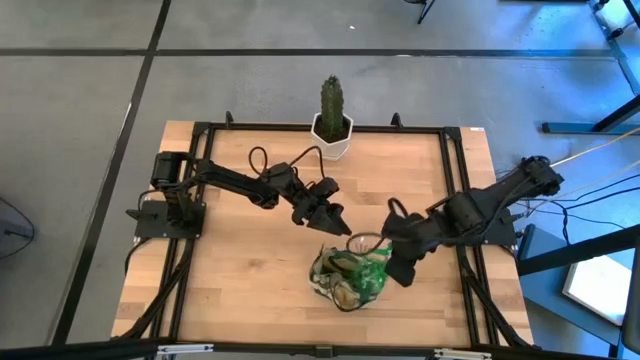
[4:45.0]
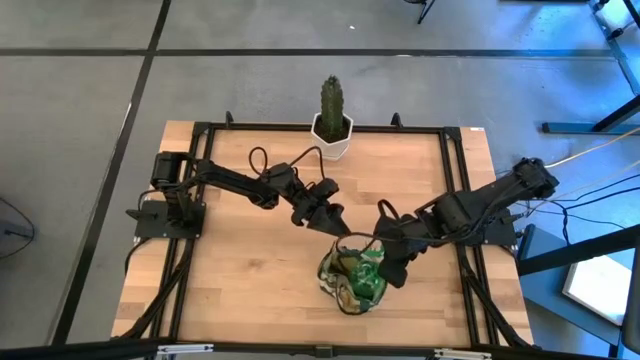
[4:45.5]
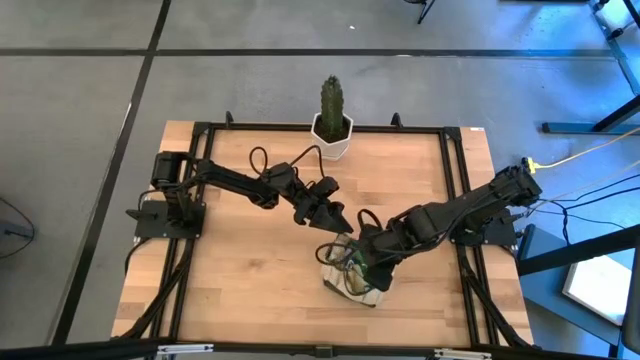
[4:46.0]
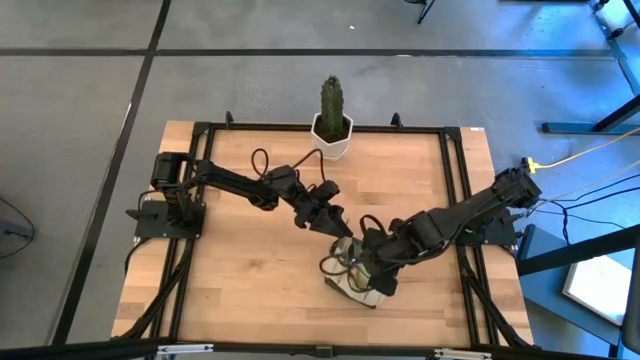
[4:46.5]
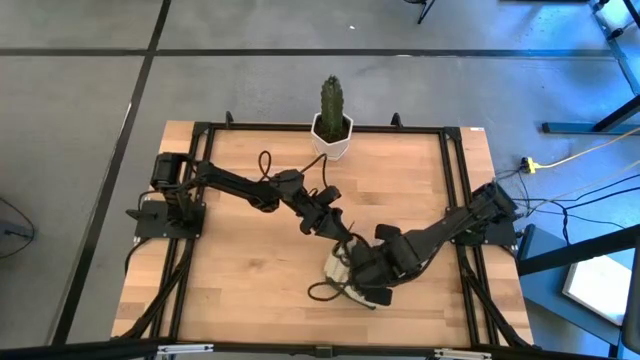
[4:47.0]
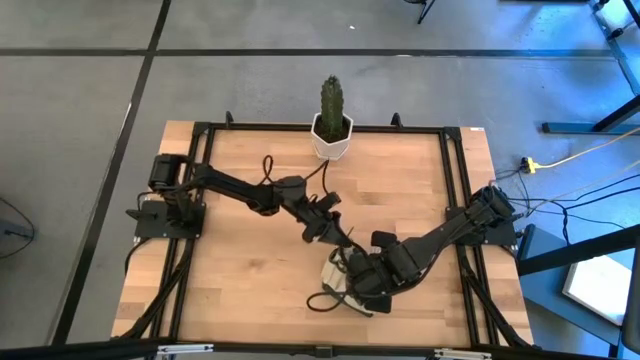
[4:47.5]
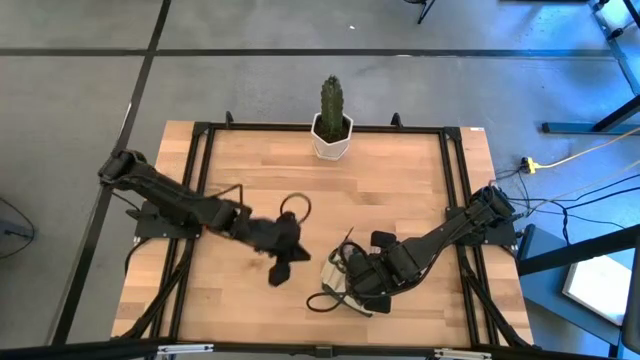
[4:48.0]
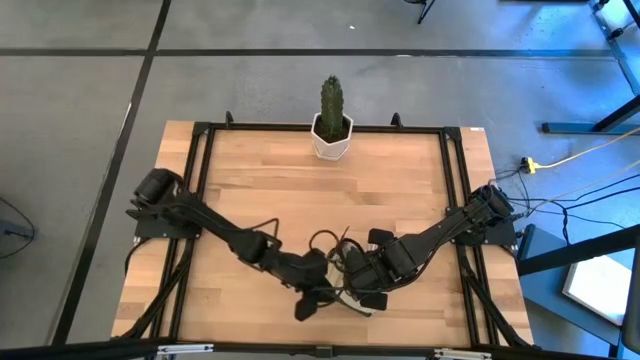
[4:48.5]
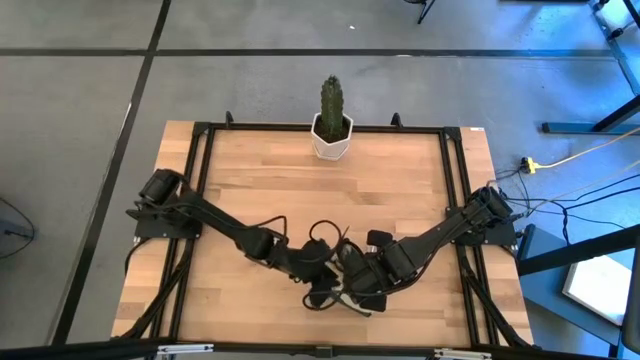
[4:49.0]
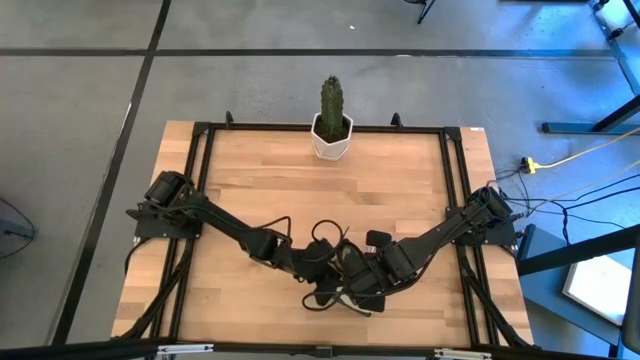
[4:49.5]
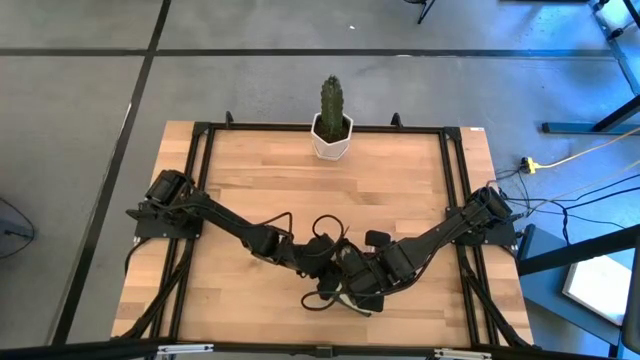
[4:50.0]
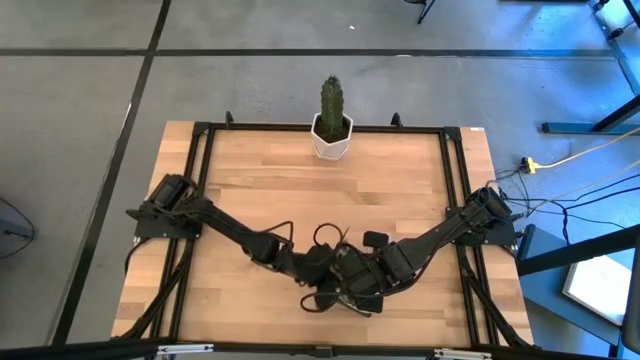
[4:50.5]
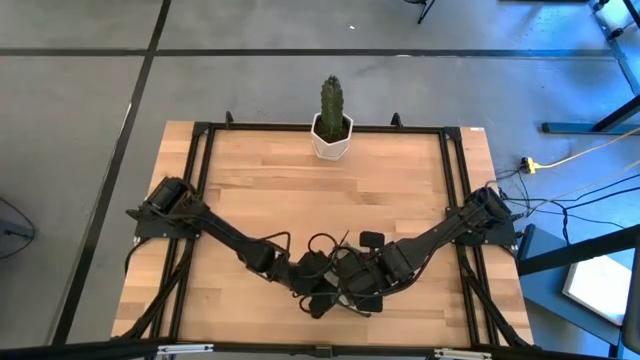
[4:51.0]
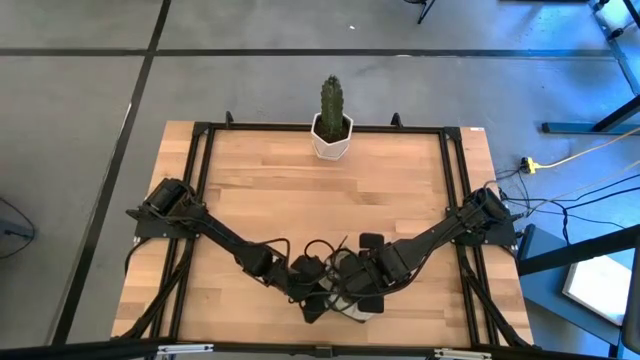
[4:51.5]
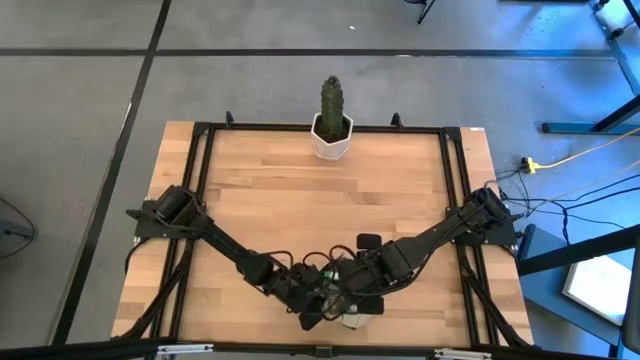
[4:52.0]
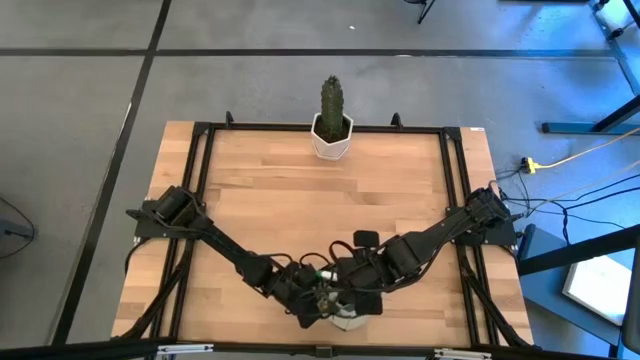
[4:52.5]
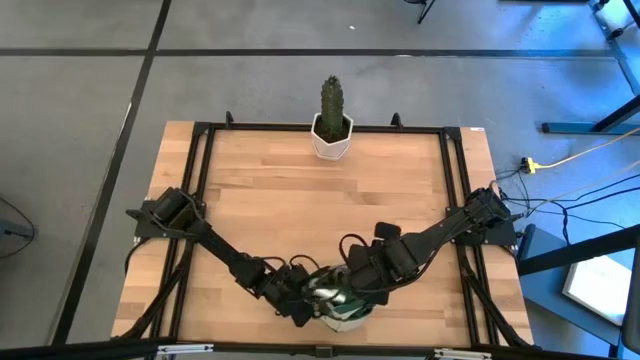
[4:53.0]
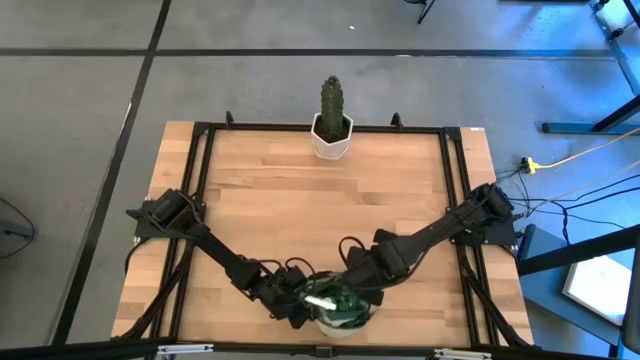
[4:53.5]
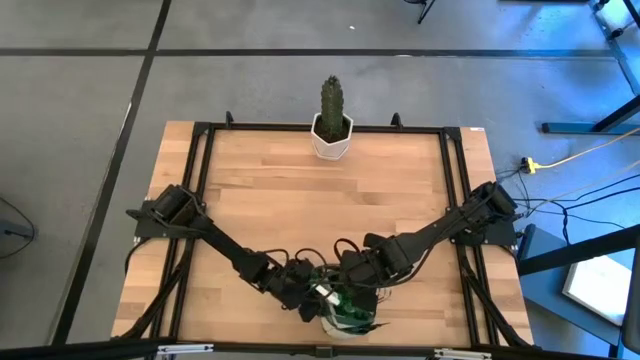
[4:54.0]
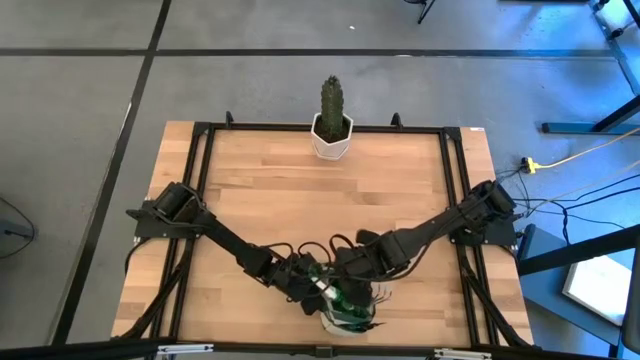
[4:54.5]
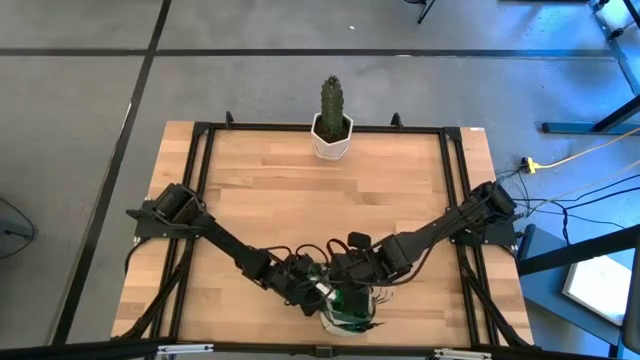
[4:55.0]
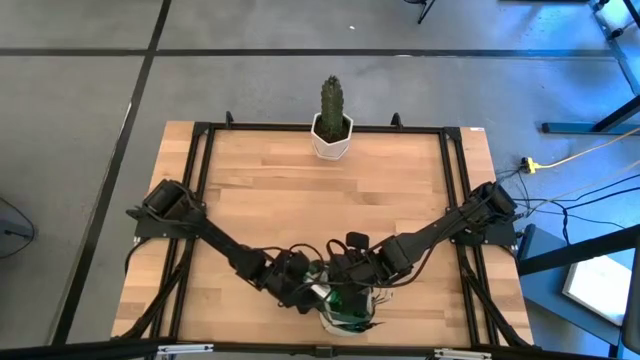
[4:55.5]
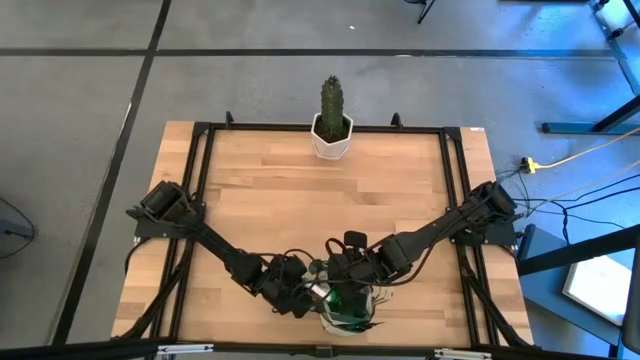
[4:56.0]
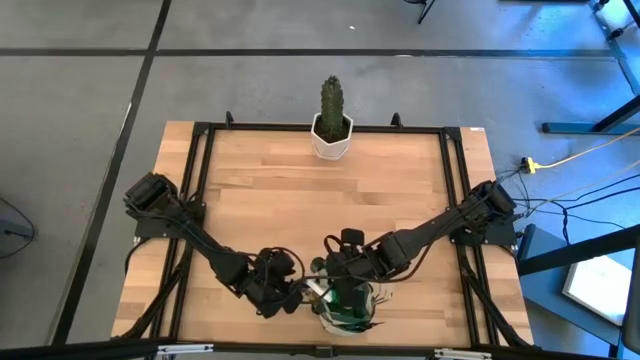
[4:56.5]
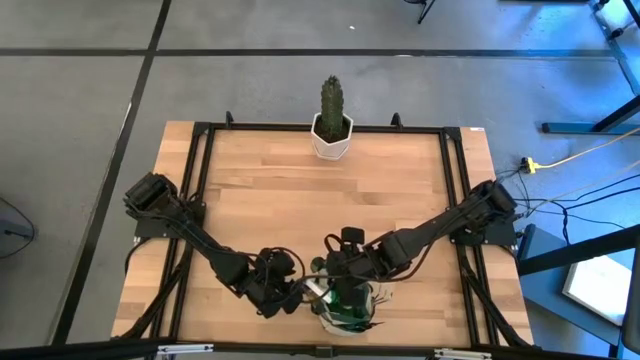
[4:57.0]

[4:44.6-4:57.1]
Task: Pick & Place Garden tools in Gardening bag
Put the green spray bottle into the green gardening bag

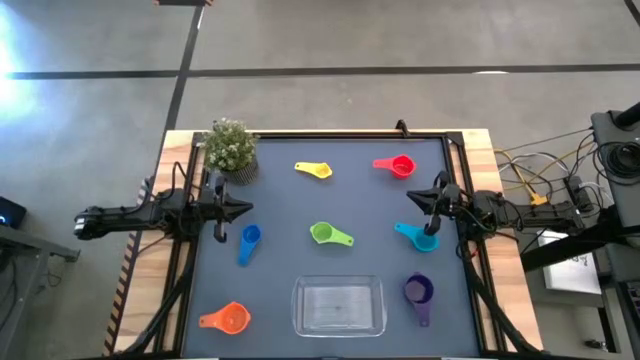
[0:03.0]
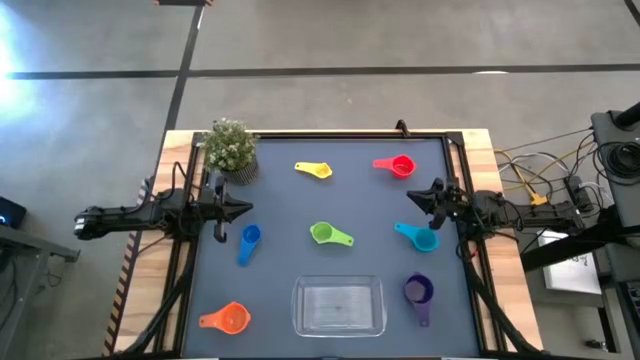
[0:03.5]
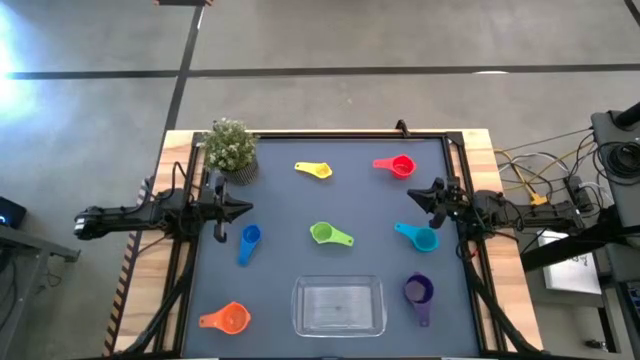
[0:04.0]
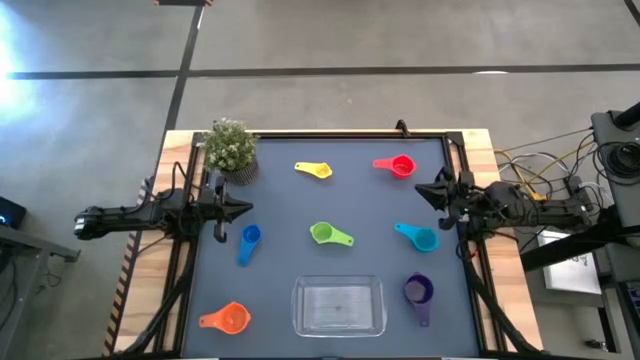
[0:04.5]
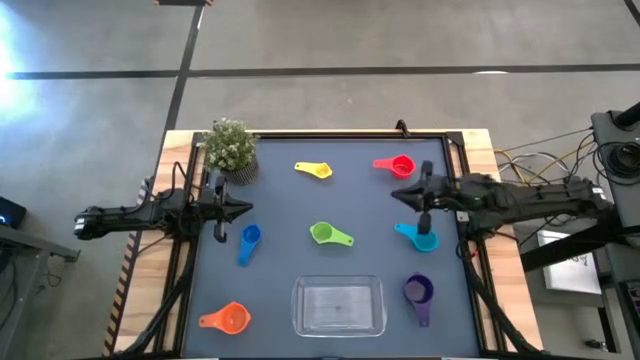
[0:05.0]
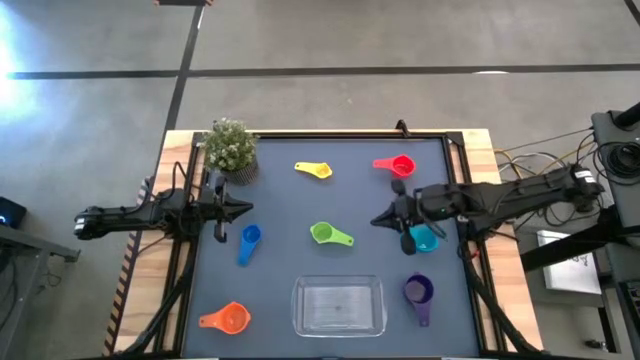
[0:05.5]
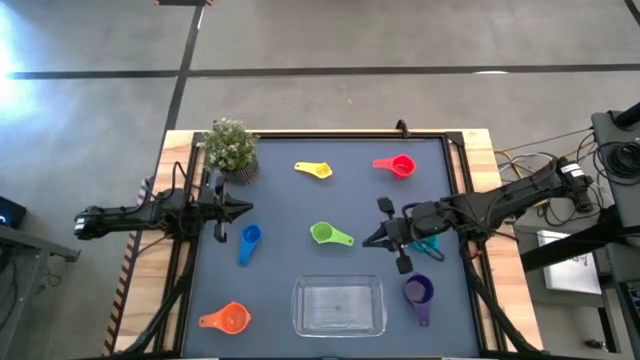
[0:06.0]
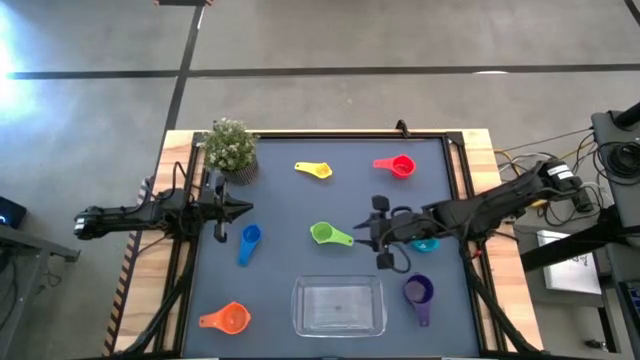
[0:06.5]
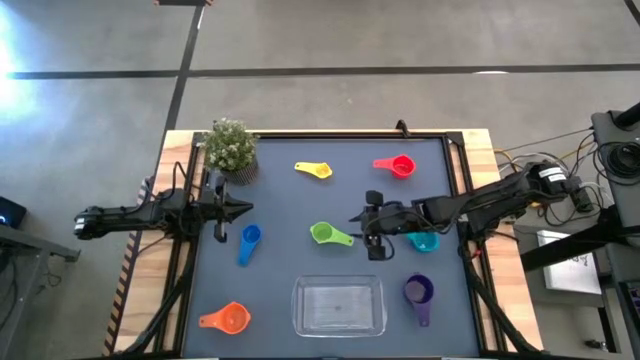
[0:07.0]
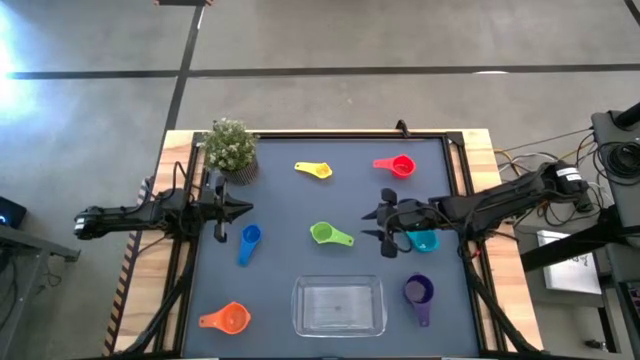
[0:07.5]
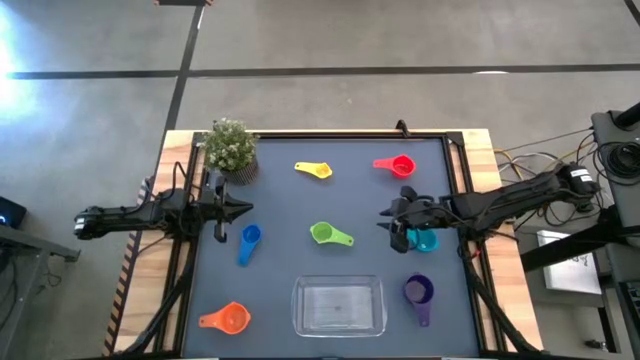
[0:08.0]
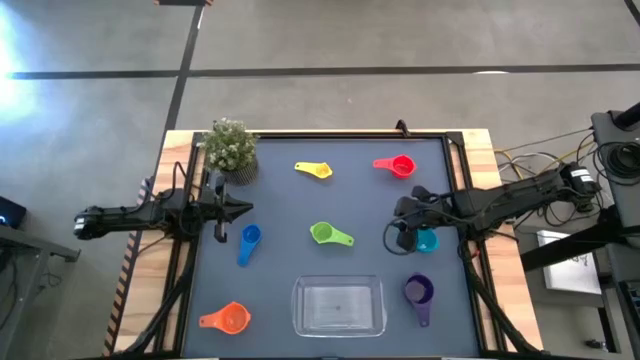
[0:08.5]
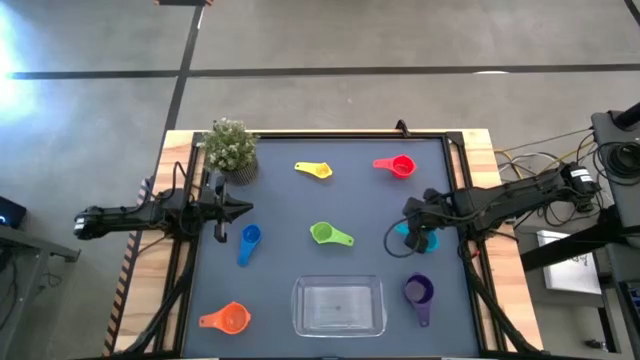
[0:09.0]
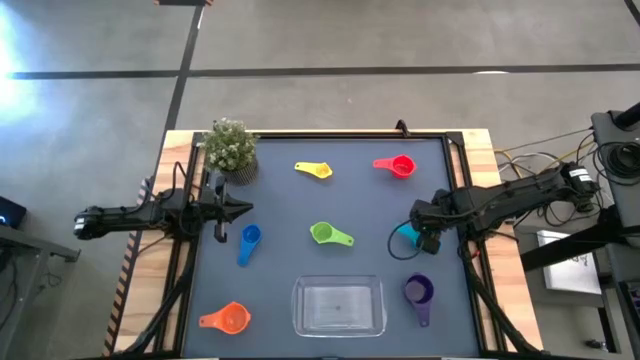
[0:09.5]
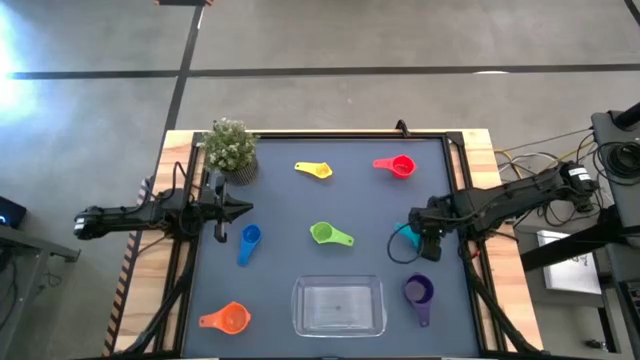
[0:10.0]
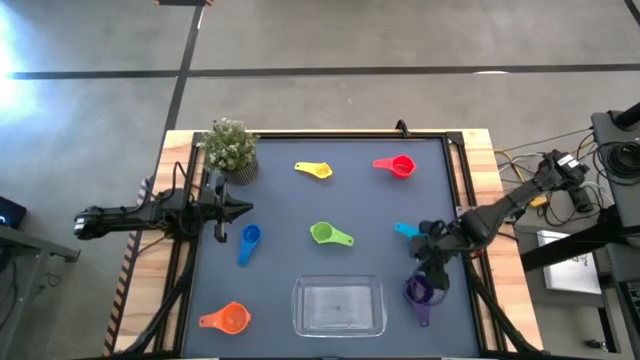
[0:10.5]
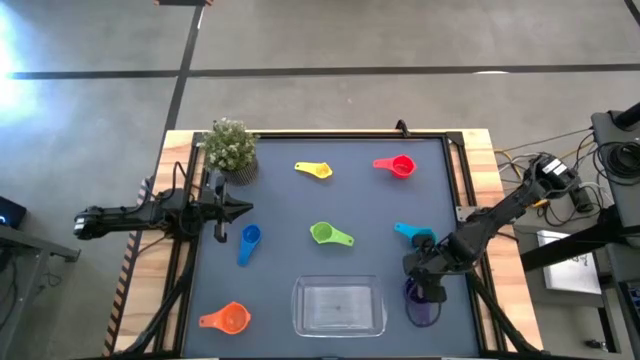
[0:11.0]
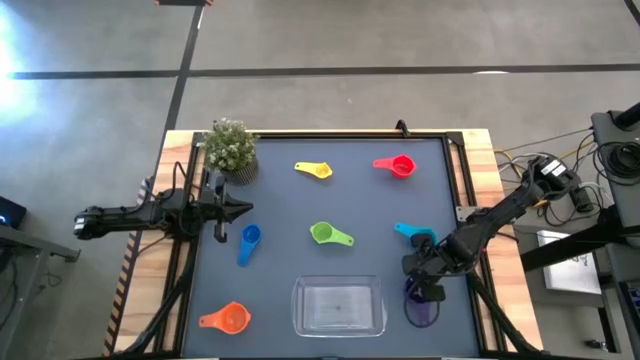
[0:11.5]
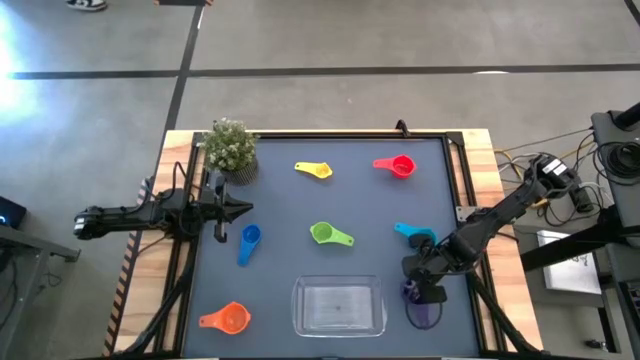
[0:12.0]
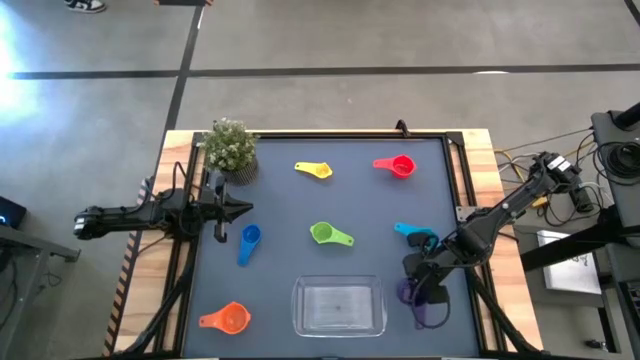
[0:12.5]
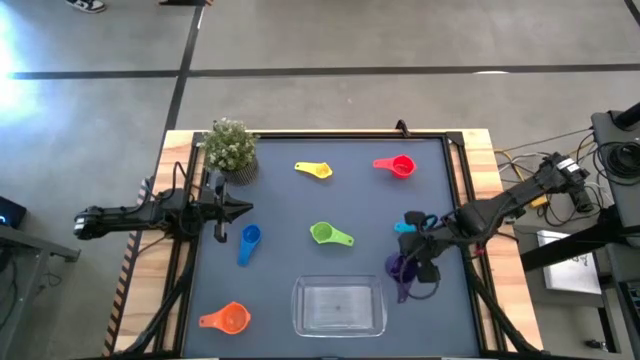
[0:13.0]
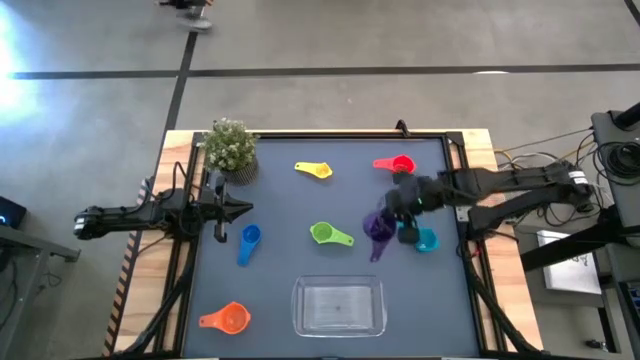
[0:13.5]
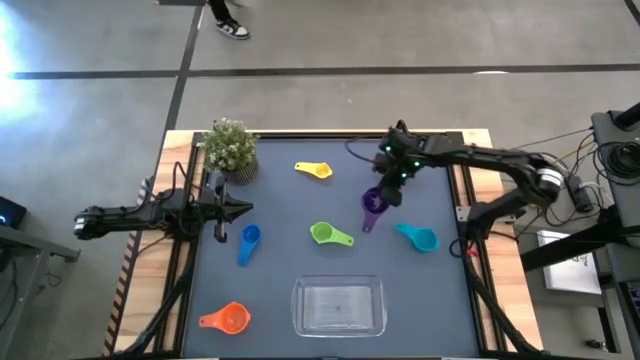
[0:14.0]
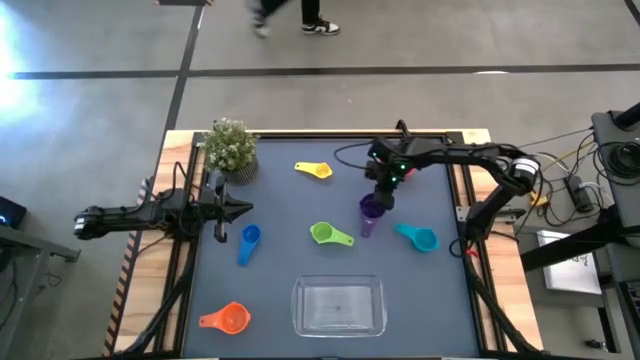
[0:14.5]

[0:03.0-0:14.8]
Task: Nest measuring cups in basket
Prepare the purple measuring cup
